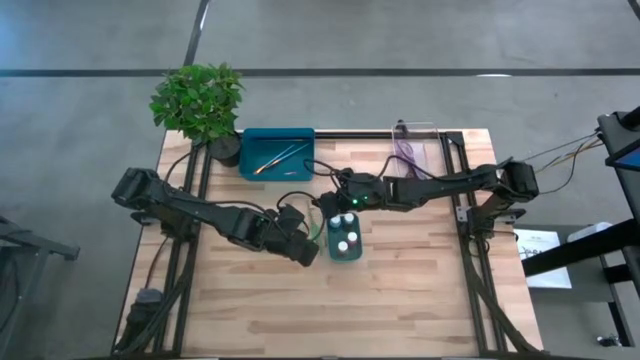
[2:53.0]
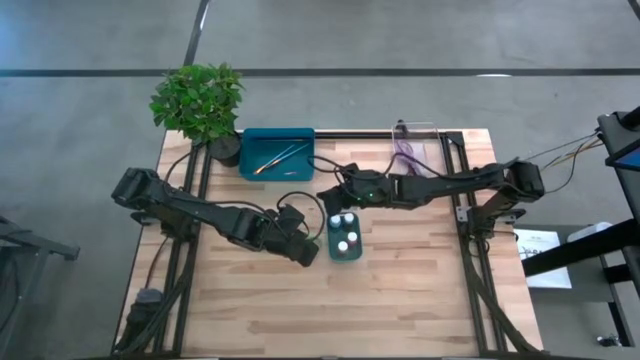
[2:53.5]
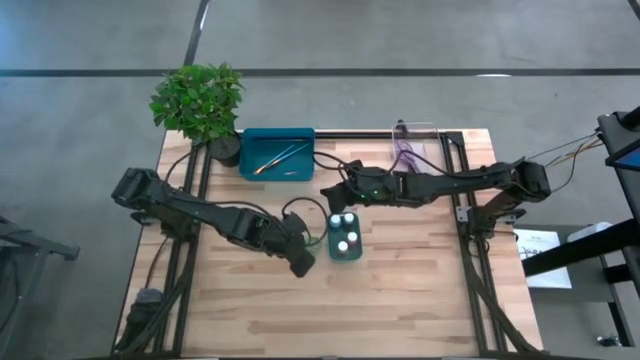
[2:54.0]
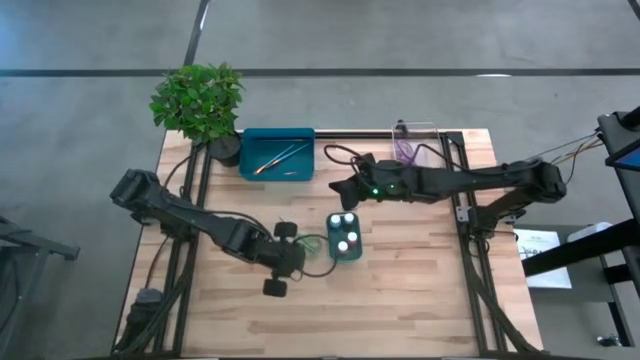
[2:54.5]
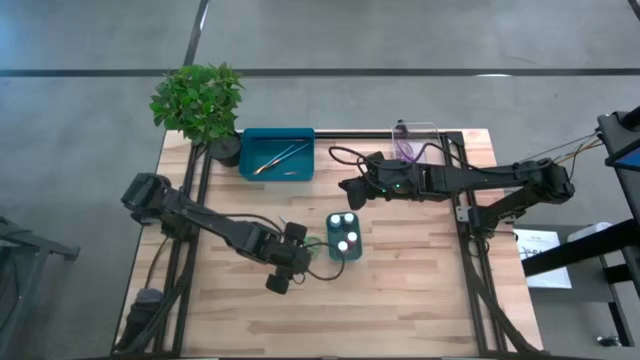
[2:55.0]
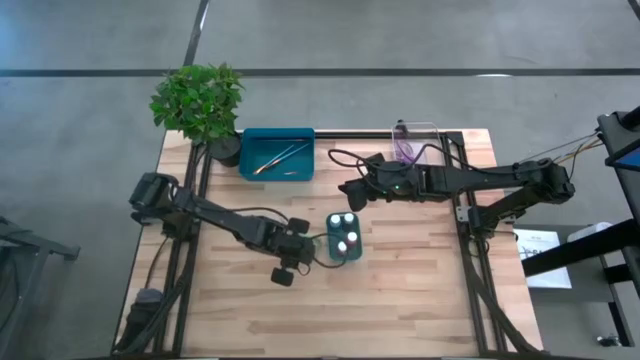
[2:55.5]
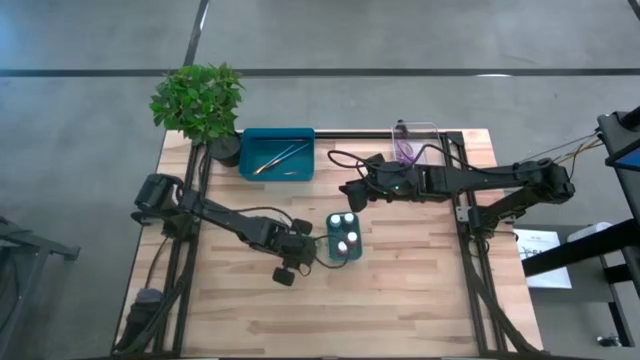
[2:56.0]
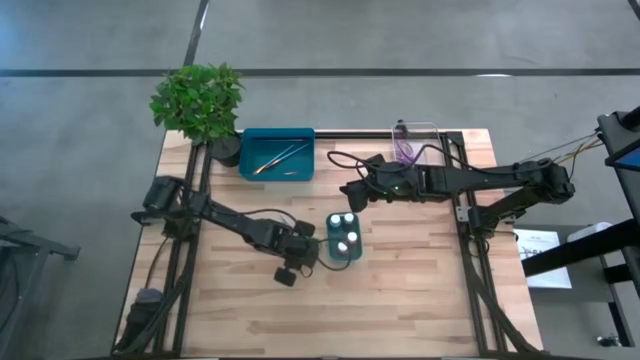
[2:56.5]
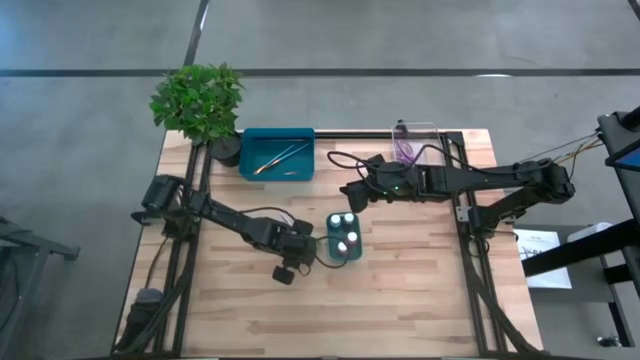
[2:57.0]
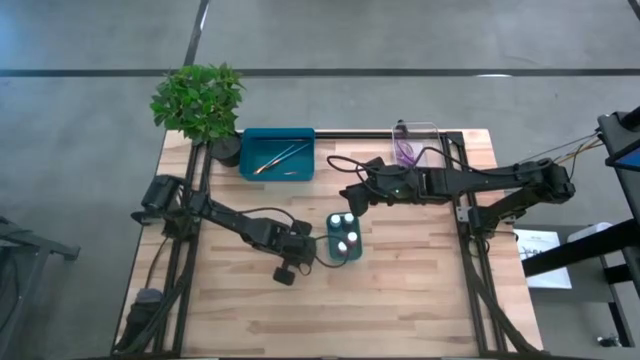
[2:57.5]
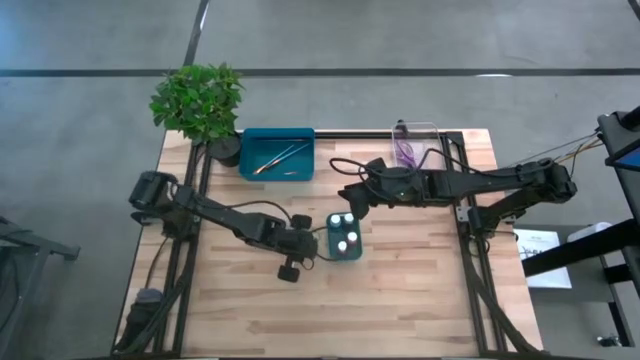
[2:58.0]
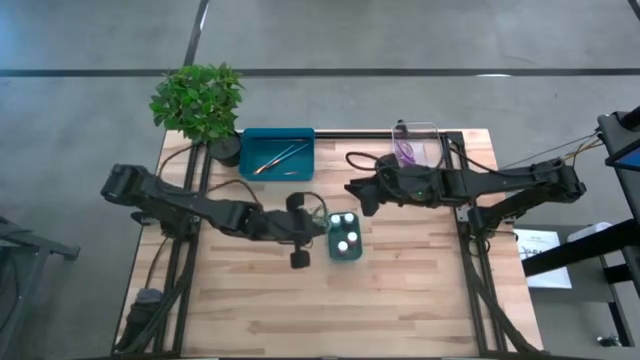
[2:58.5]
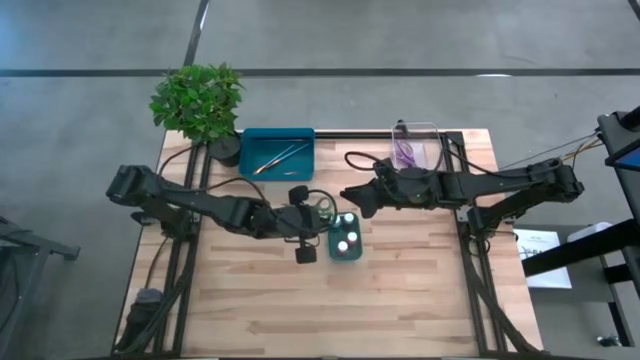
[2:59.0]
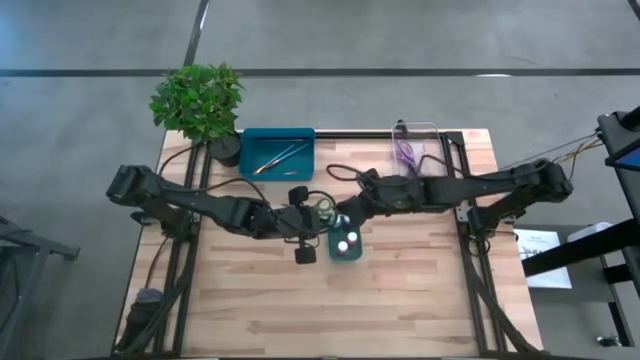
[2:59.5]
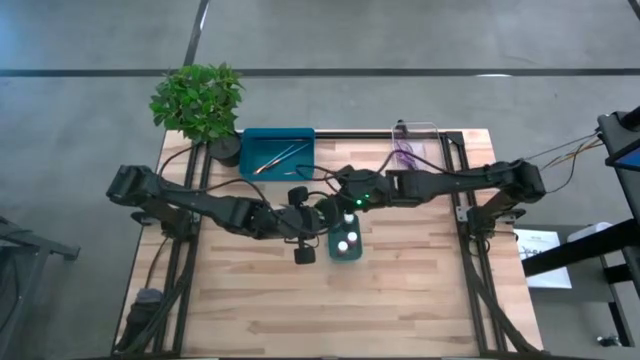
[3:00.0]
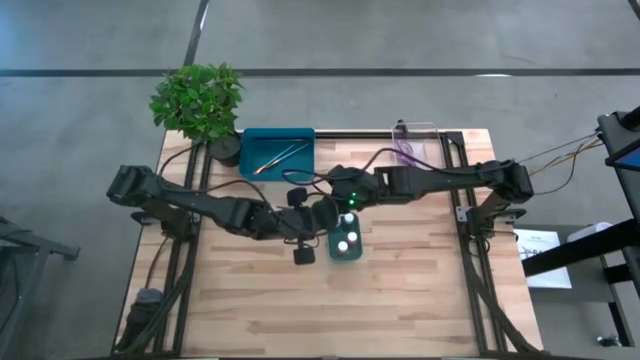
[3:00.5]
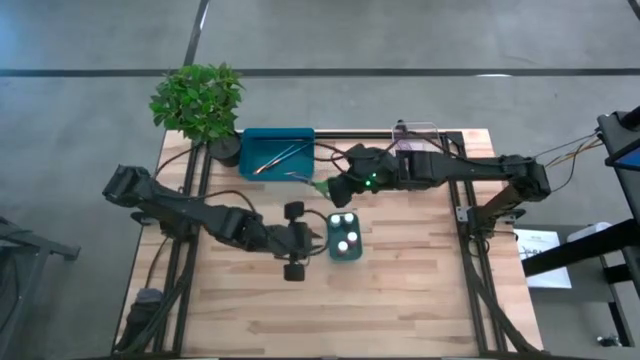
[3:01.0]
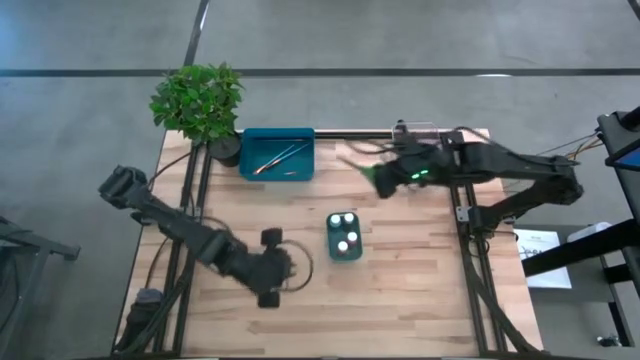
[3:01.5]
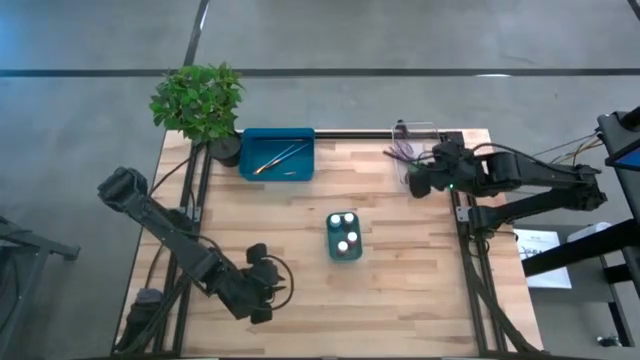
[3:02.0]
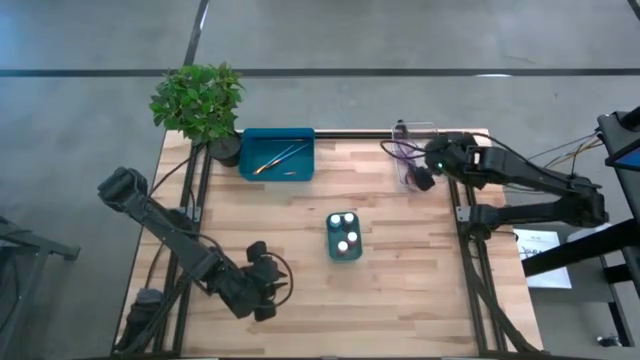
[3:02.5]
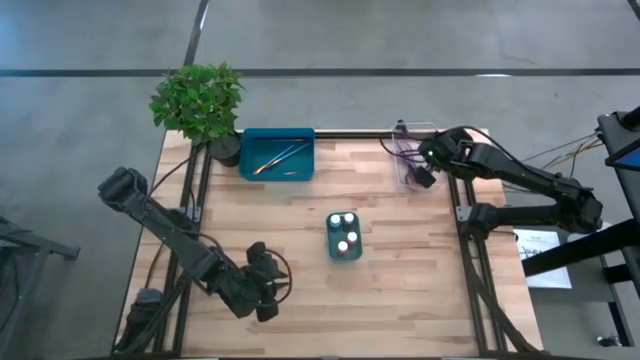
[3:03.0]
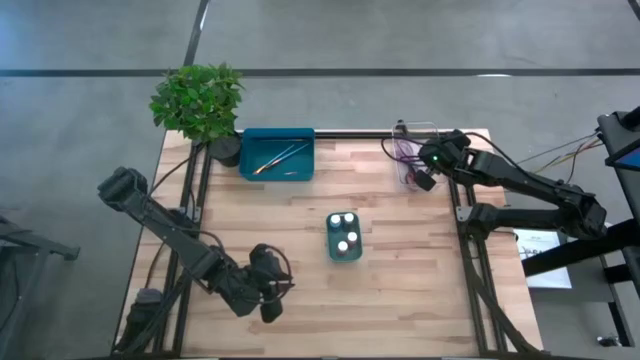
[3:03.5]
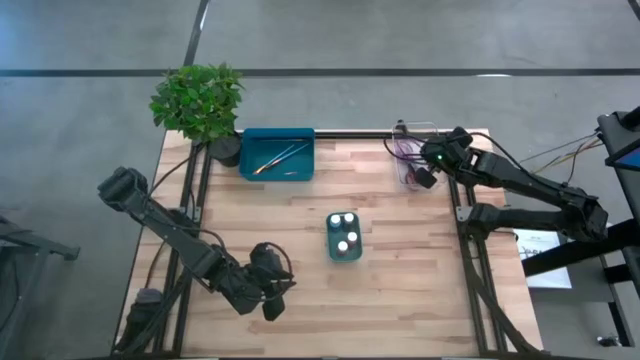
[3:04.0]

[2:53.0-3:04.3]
Task: Pick & Place Paint Supplies
Put the green scissors into the transparent bin

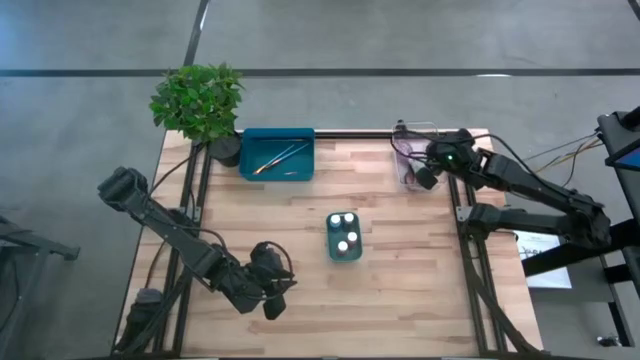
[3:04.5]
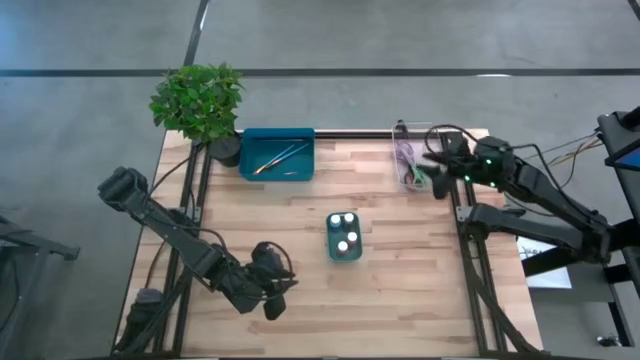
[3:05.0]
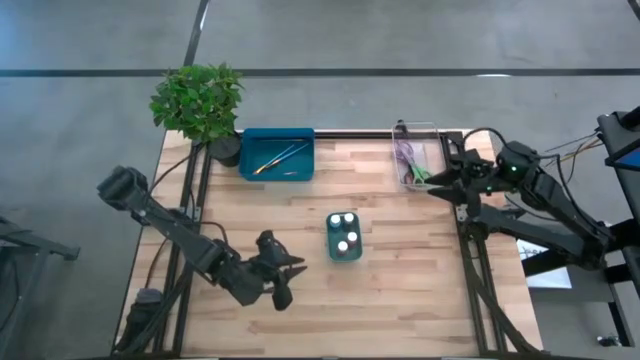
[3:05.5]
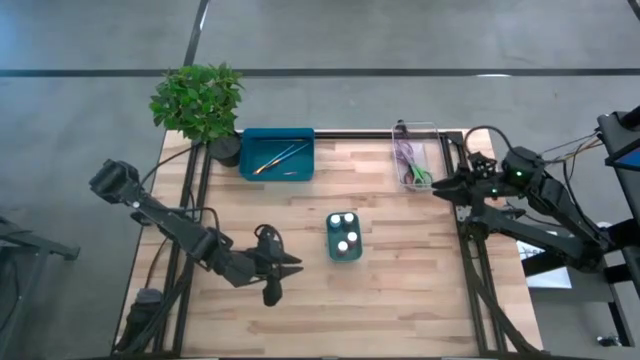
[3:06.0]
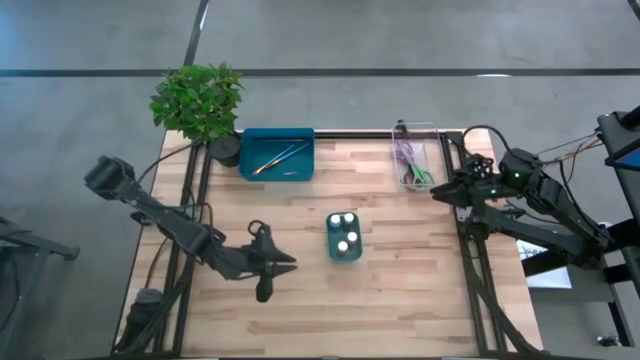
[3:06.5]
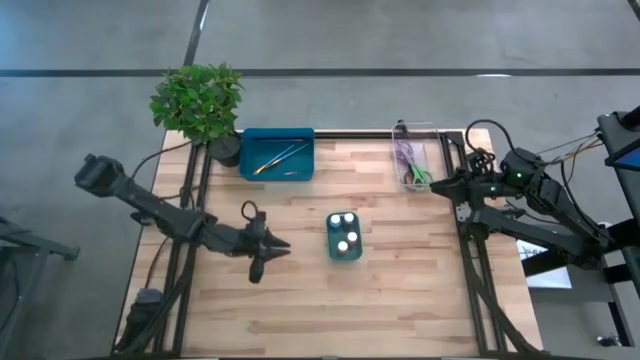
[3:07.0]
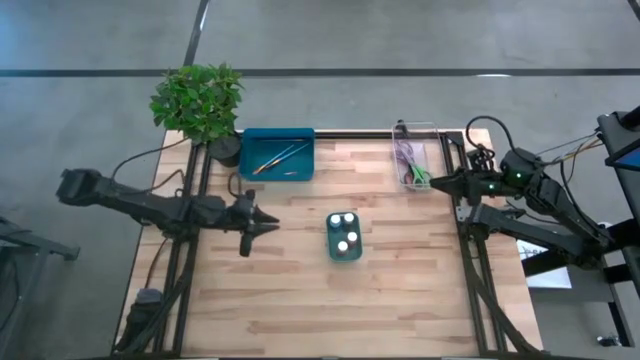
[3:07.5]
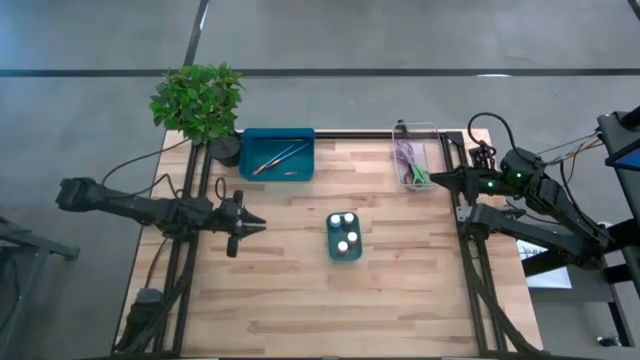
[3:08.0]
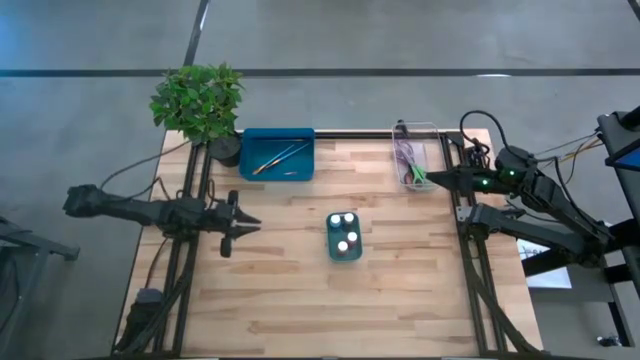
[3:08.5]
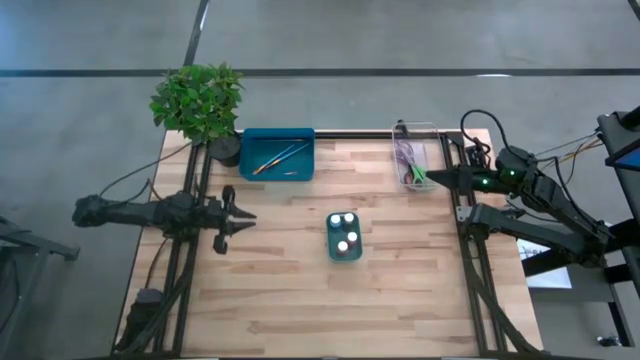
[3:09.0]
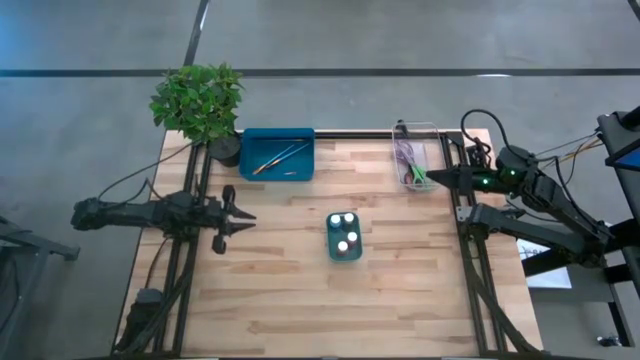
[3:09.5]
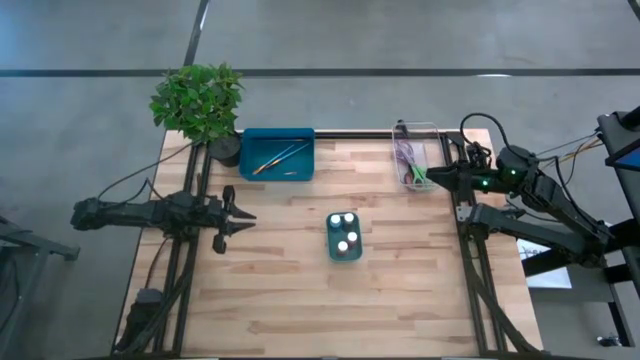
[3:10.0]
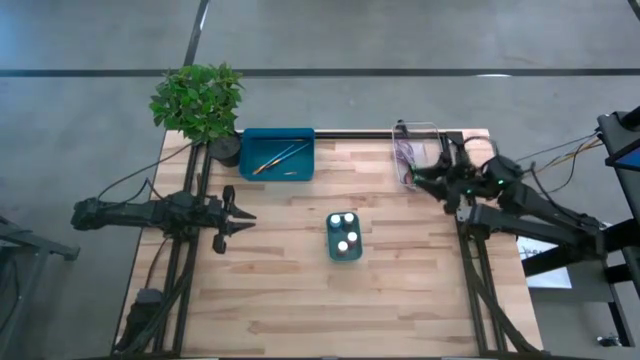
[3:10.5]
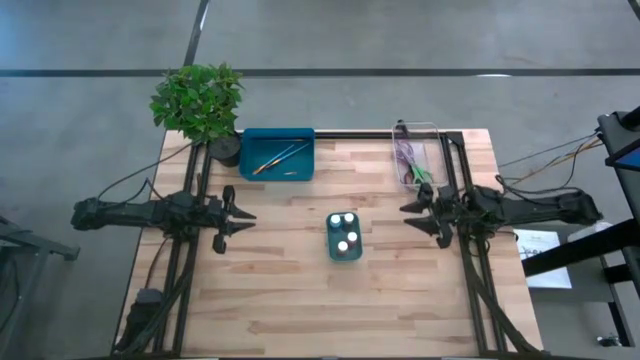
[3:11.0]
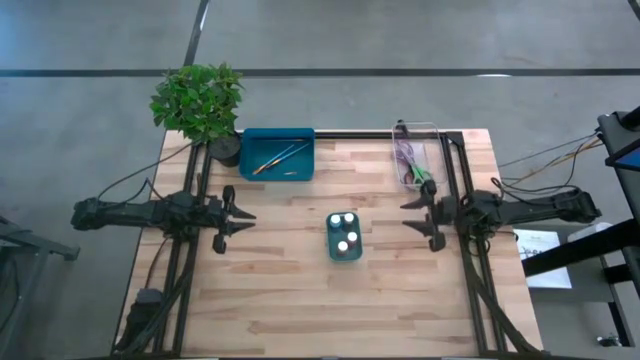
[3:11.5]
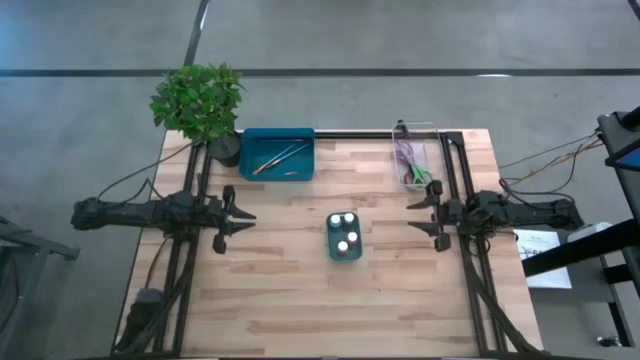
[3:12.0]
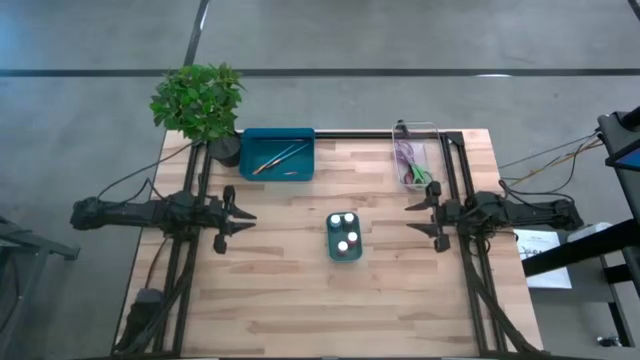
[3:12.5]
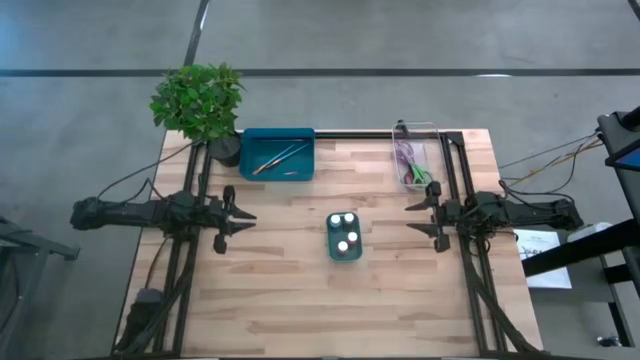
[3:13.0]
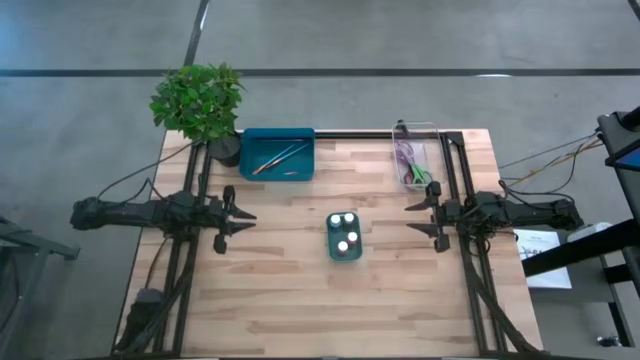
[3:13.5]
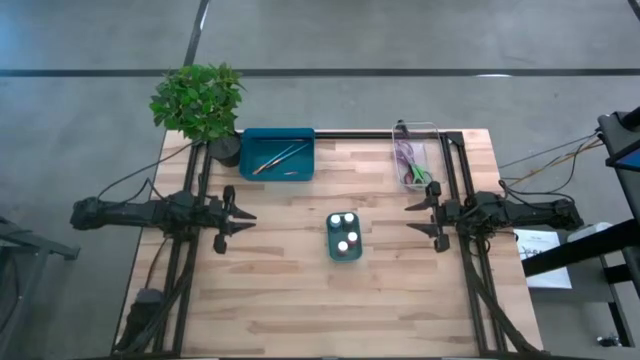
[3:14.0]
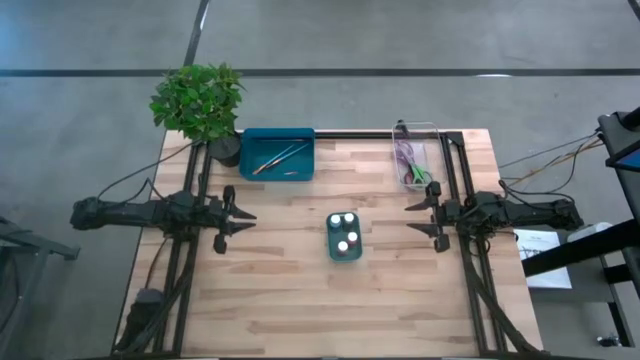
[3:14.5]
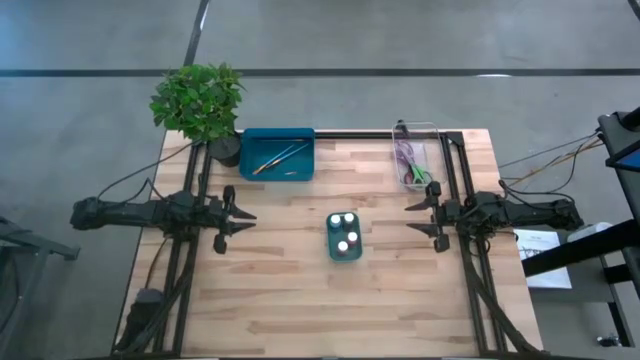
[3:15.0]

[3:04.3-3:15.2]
Return to Home Position
